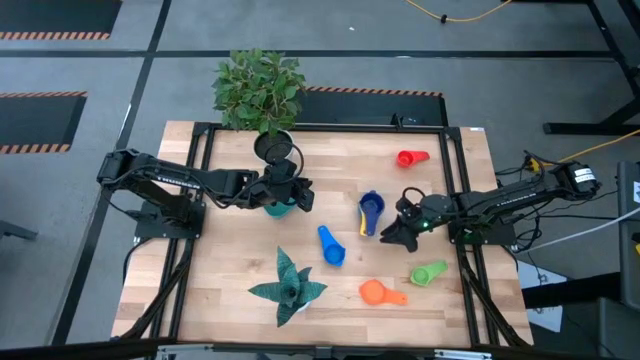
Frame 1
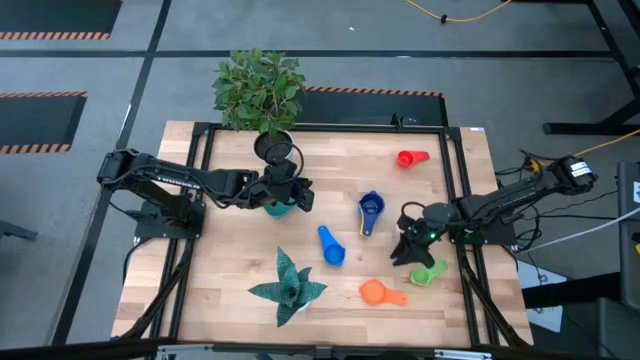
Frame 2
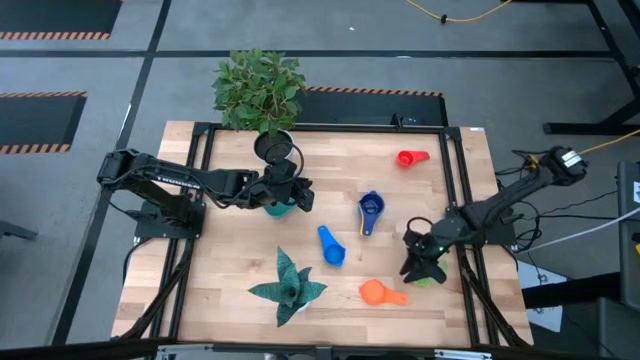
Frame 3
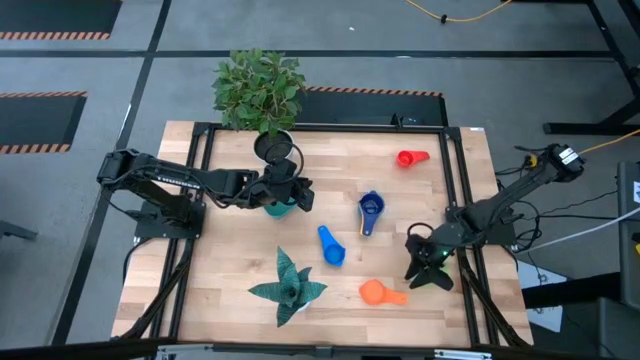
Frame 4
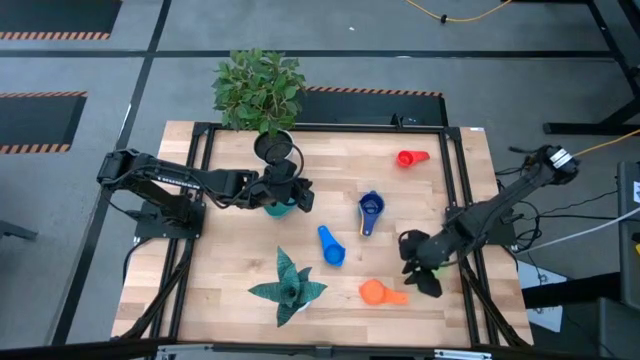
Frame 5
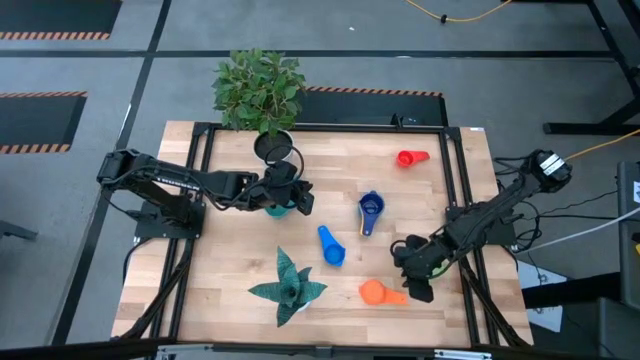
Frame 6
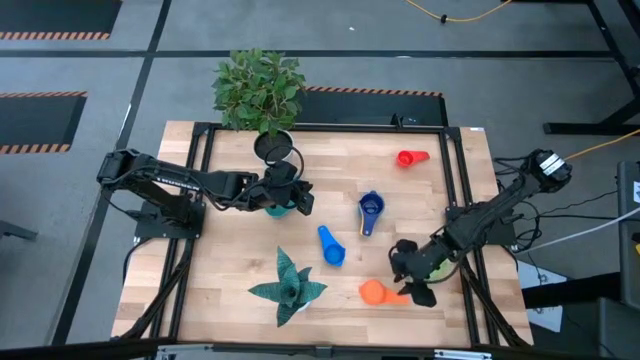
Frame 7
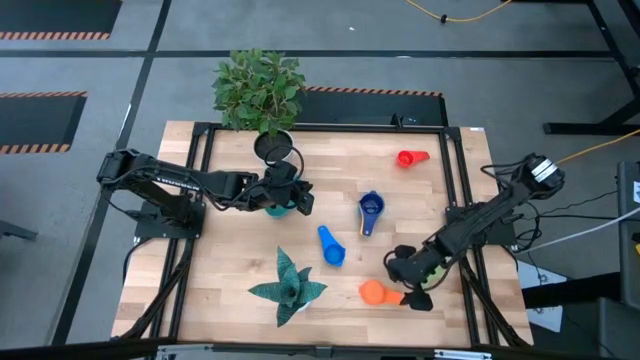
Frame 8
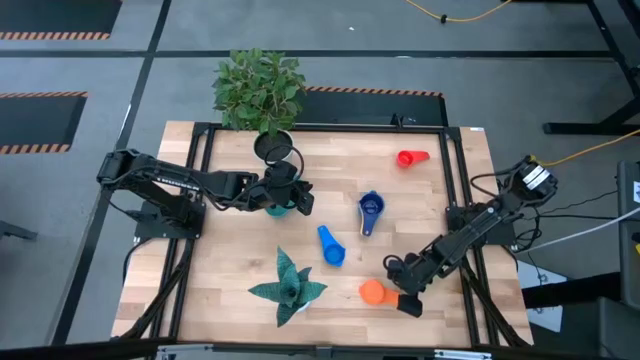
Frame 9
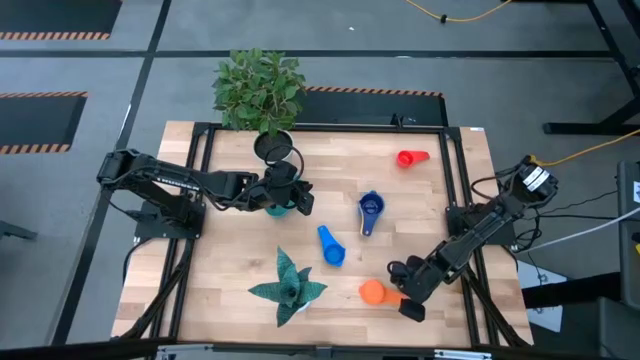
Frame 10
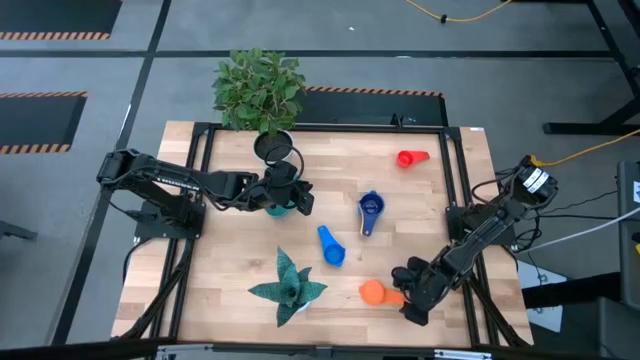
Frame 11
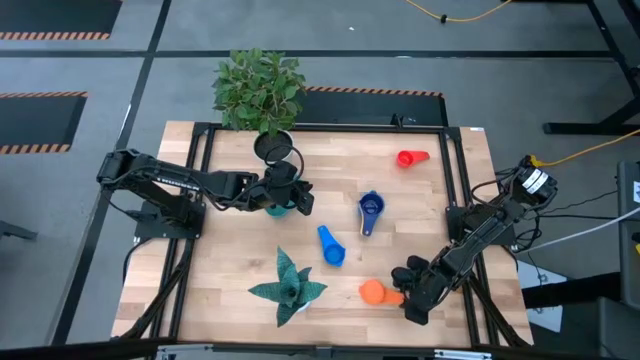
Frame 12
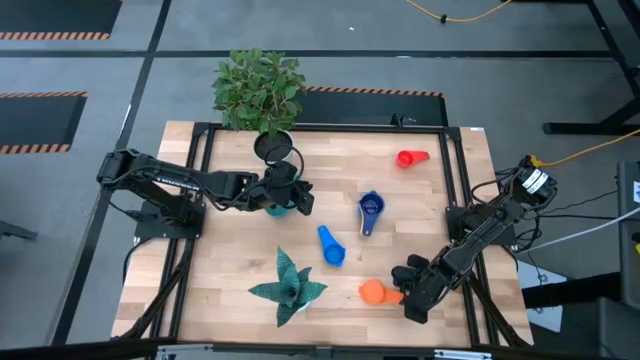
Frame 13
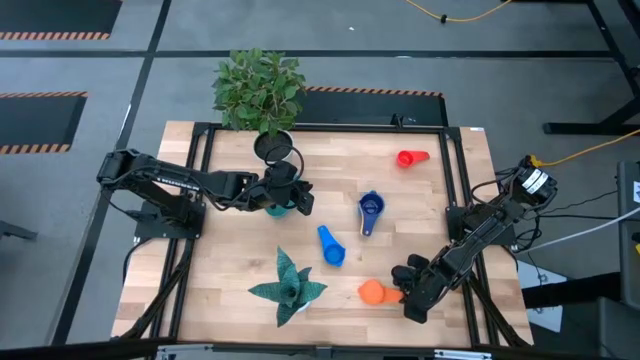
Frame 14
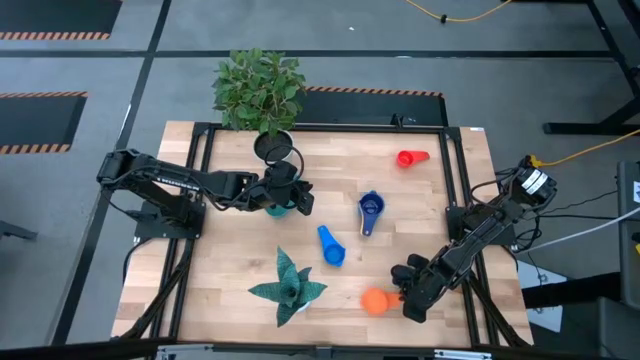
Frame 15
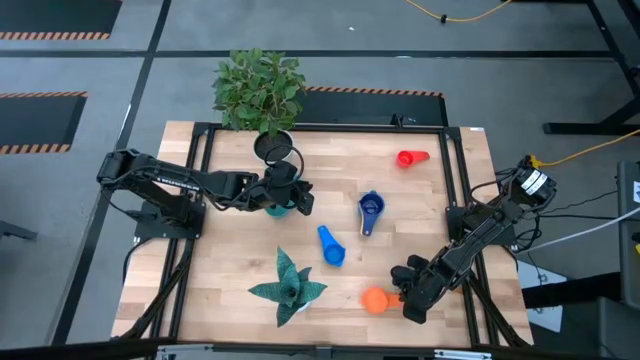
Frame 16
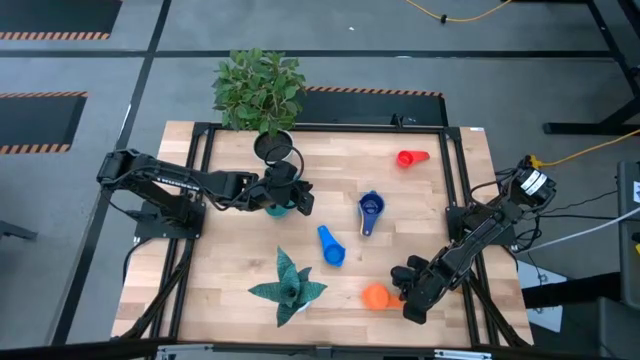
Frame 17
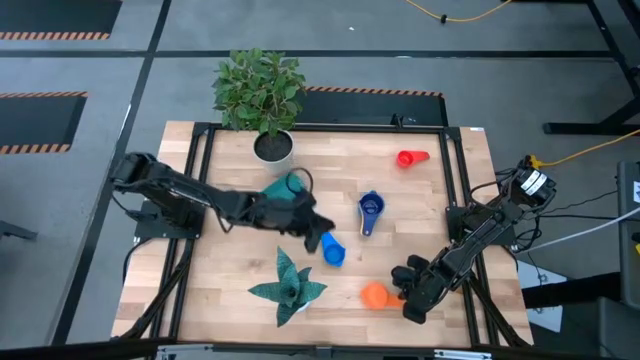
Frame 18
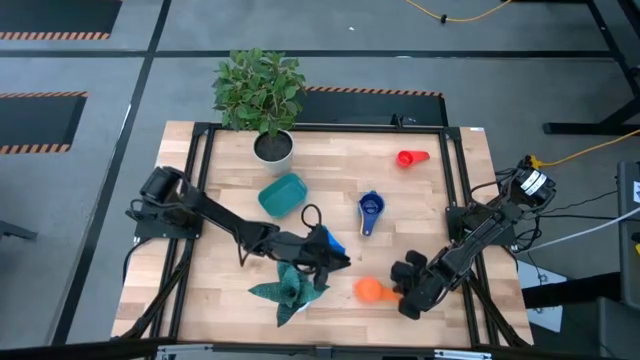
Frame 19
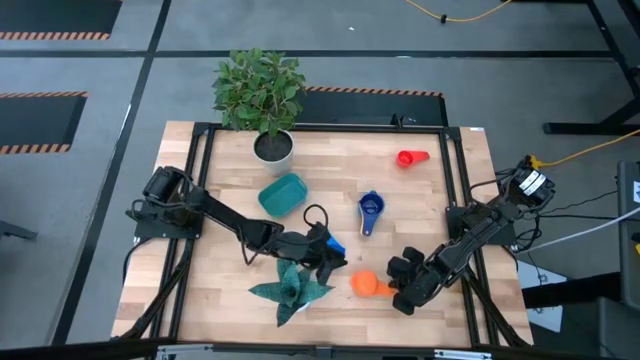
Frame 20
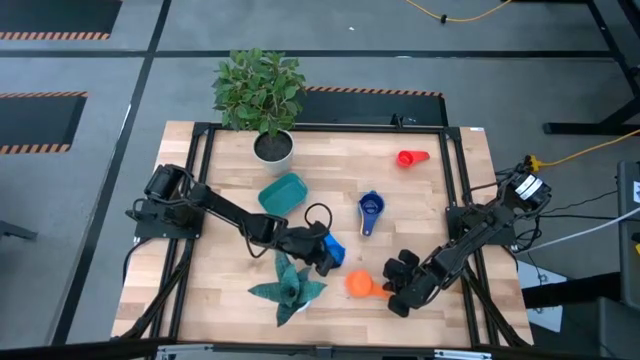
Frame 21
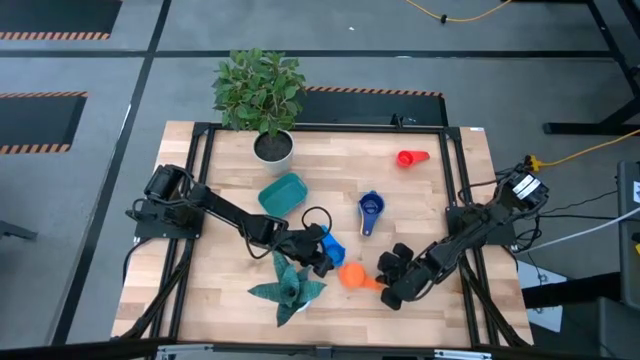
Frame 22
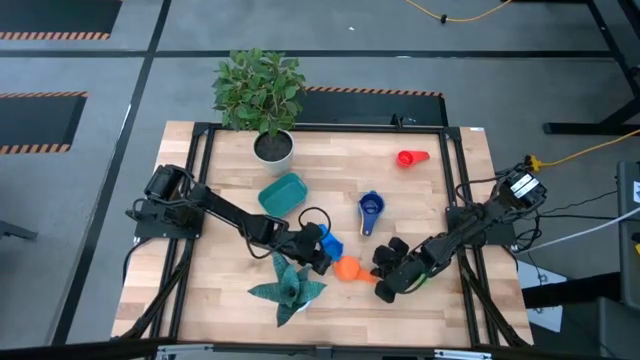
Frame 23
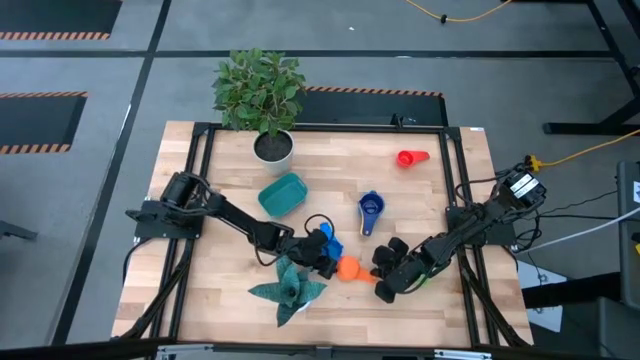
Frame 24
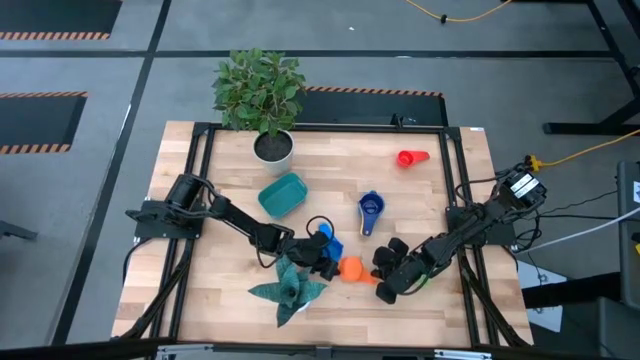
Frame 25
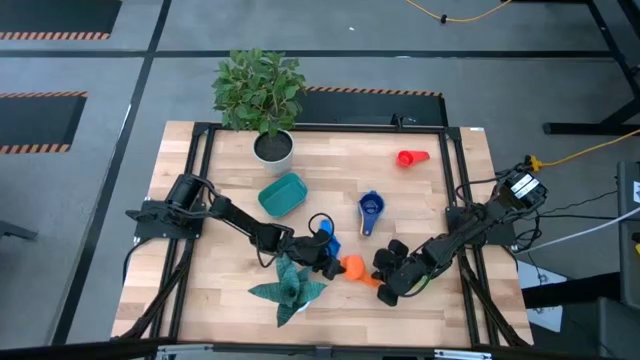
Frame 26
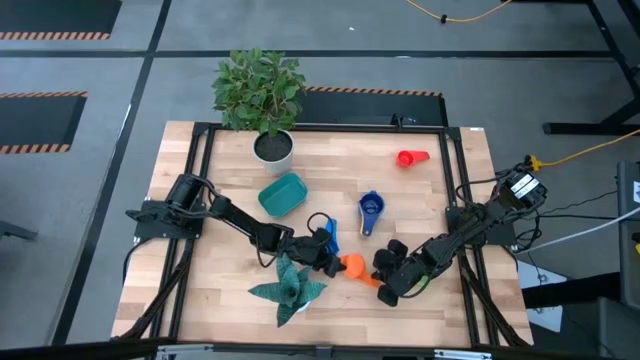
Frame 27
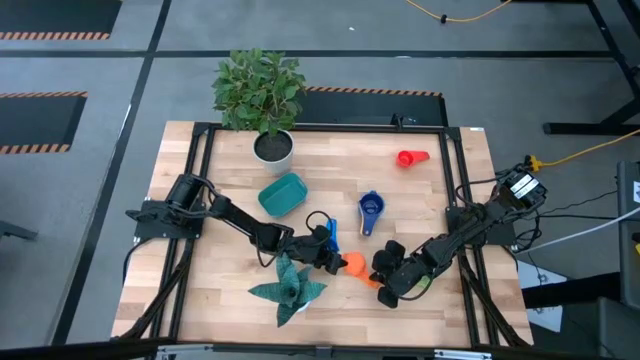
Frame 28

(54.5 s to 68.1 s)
Task: Nest measuring cups in basket
Stack the orange measuring cup on top of the blue measuring cup

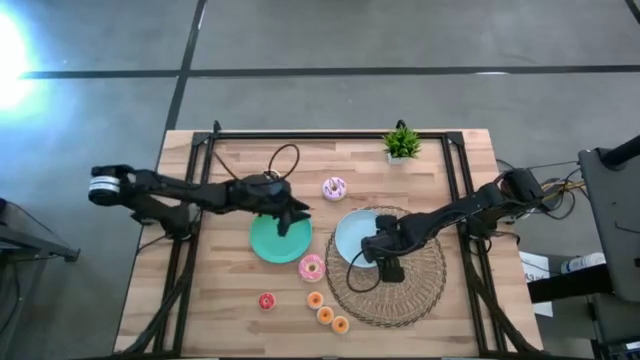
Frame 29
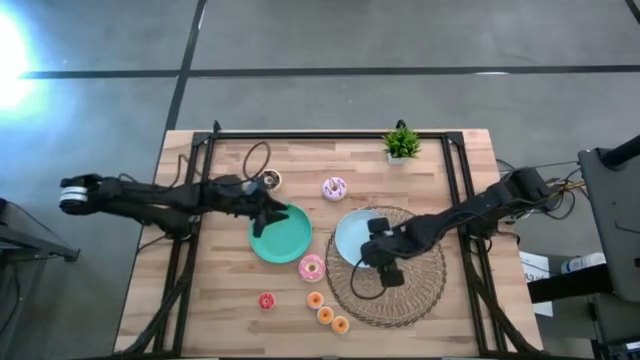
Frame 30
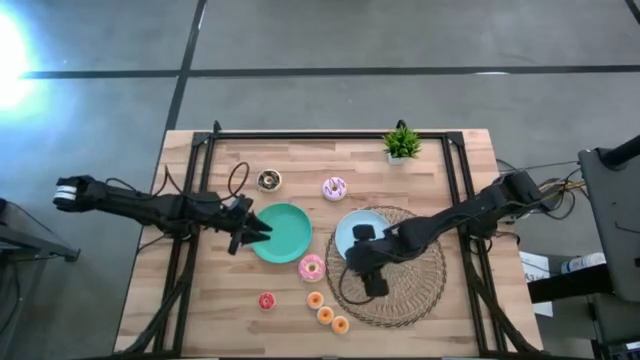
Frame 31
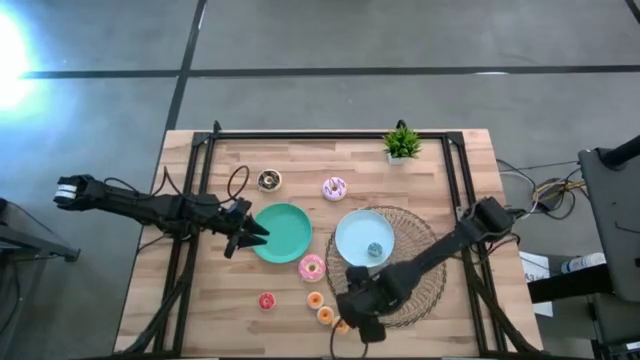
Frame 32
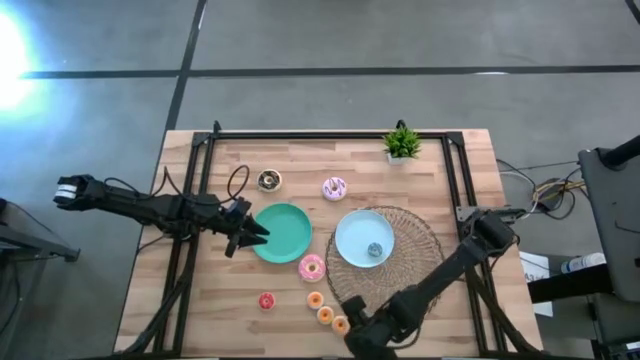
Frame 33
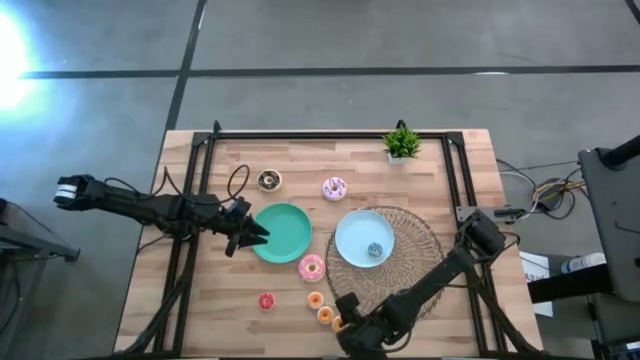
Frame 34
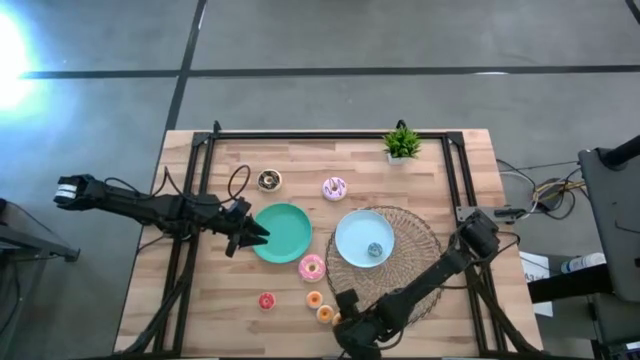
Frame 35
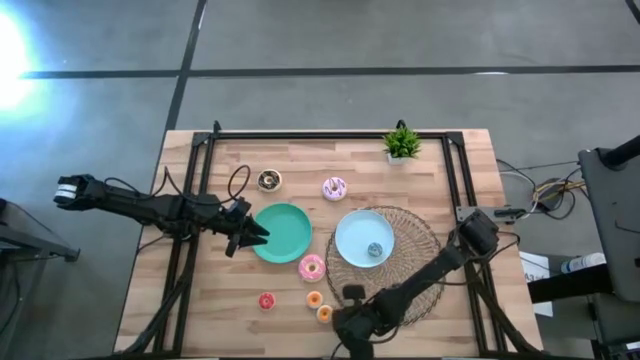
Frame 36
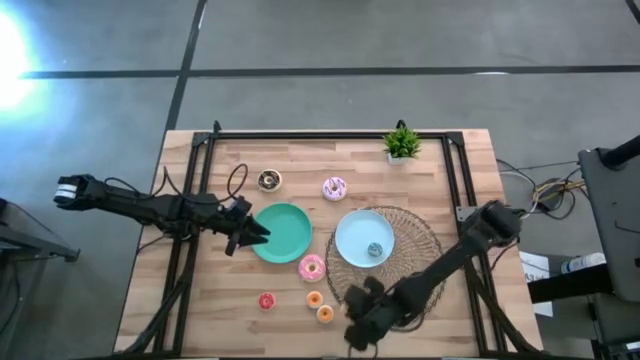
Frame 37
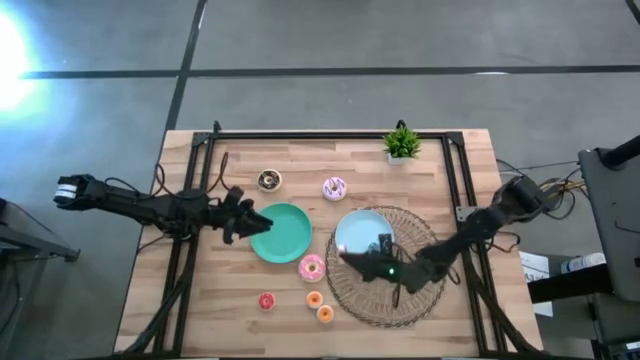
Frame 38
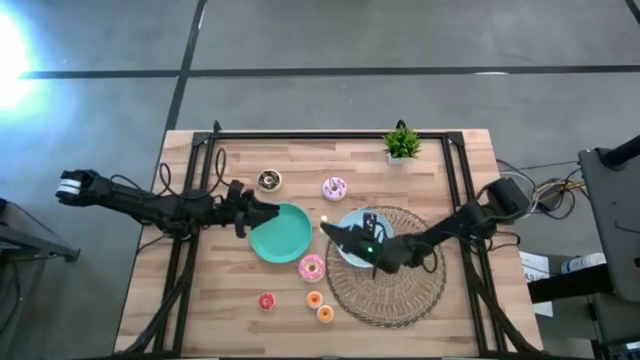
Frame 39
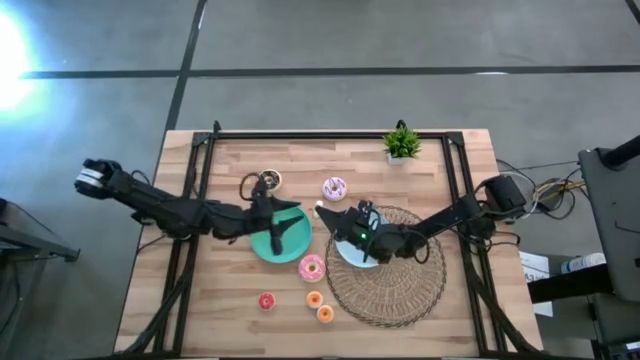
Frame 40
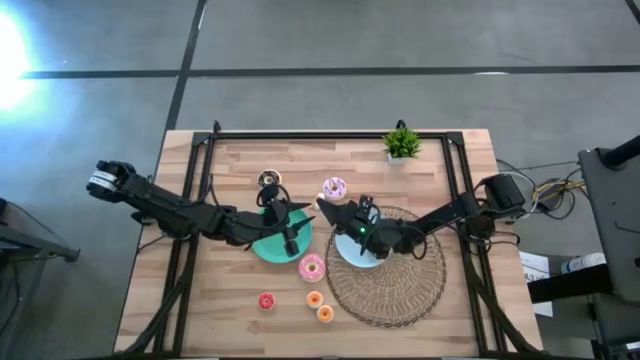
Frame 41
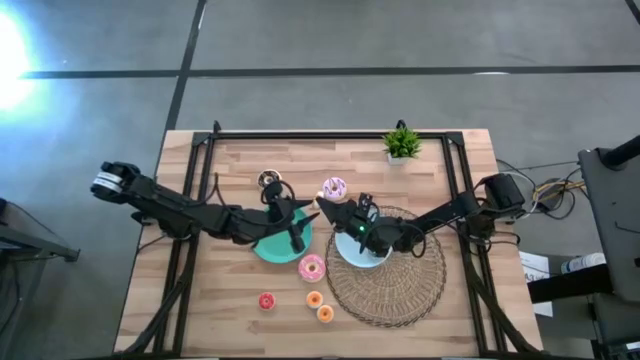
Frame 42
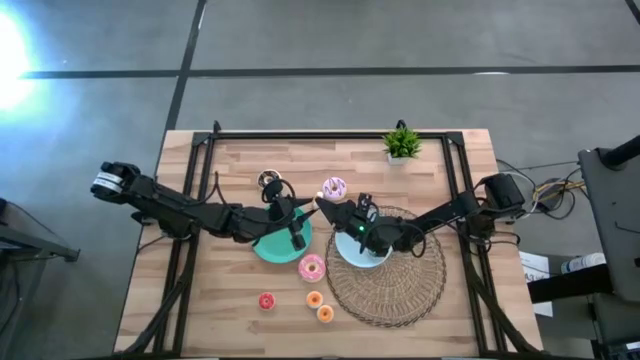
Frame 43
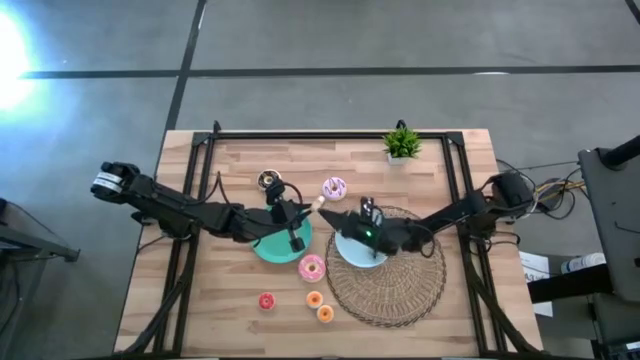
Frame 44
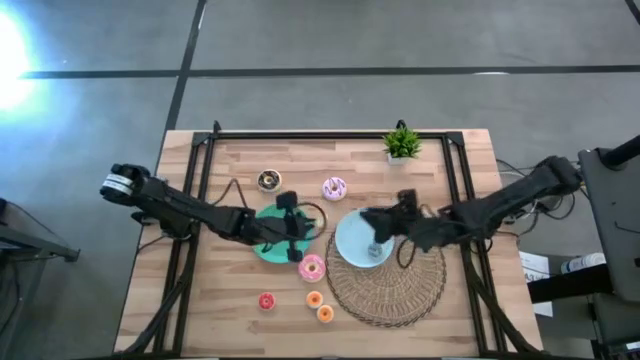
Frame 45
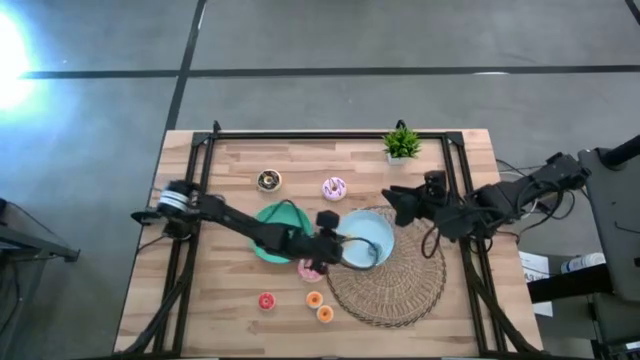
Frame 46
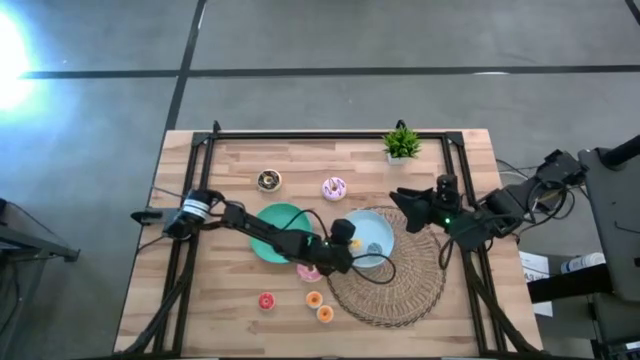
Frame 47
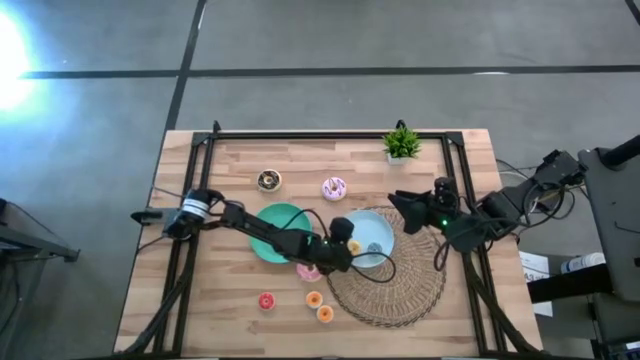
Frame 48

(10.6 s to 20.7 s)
Task: Pick & Place donuts
Put the small yellow donut on the blue plate
